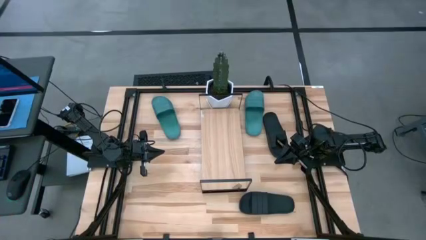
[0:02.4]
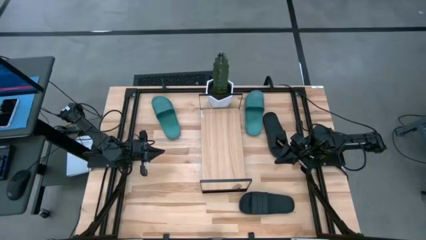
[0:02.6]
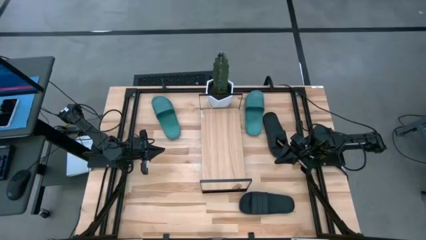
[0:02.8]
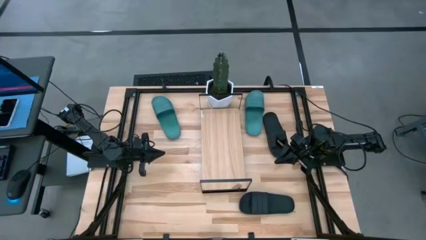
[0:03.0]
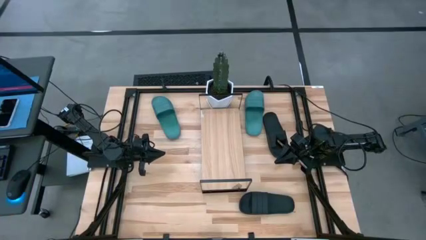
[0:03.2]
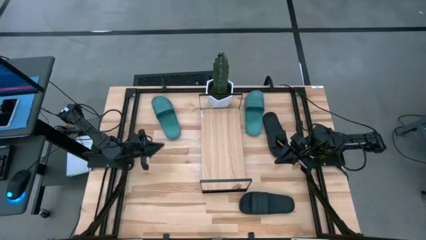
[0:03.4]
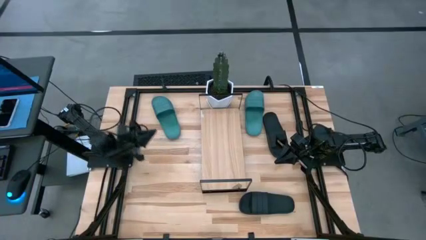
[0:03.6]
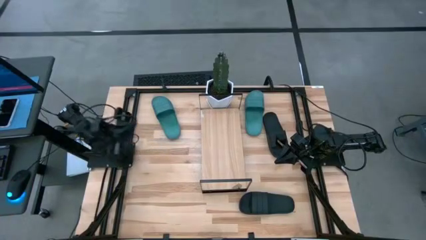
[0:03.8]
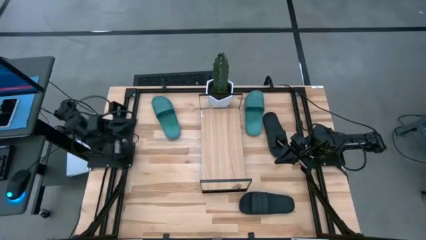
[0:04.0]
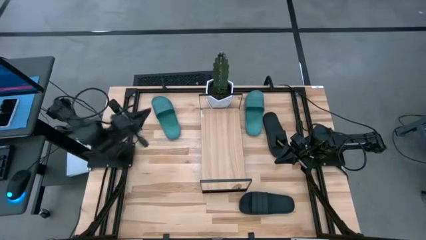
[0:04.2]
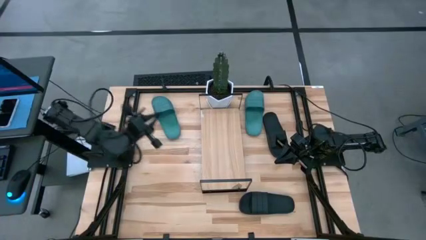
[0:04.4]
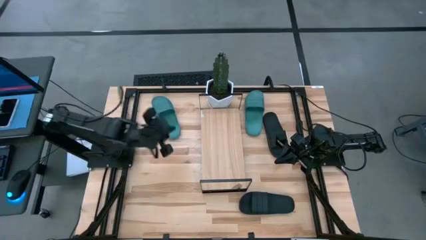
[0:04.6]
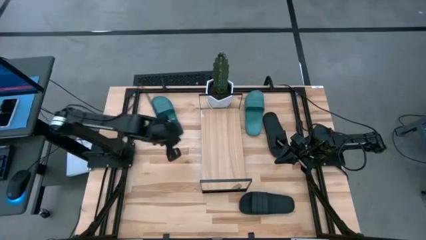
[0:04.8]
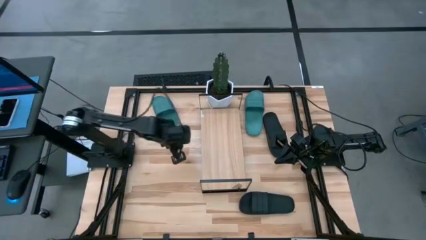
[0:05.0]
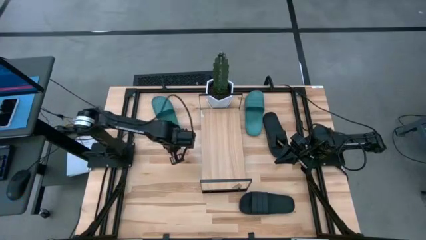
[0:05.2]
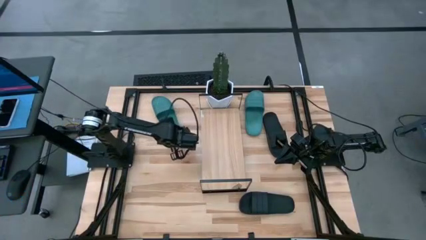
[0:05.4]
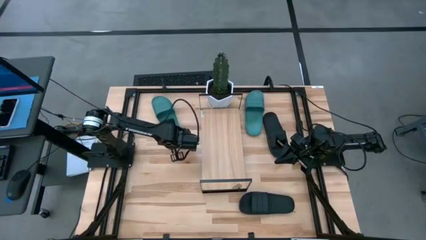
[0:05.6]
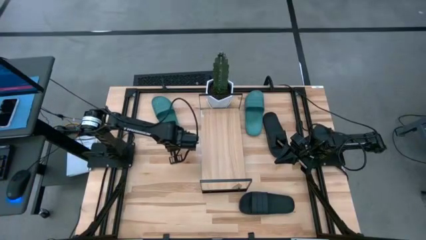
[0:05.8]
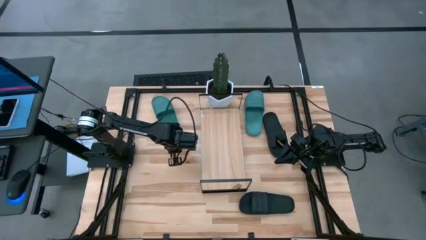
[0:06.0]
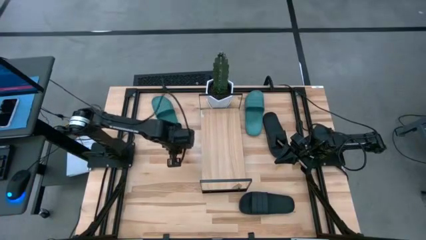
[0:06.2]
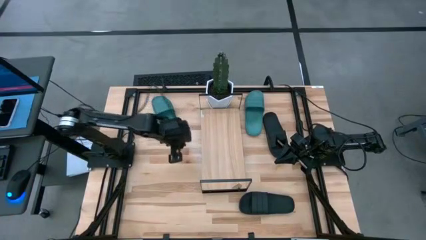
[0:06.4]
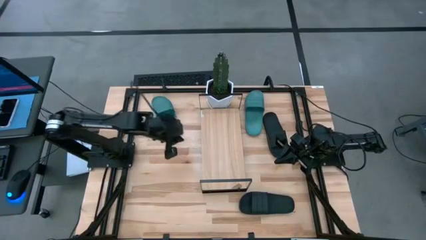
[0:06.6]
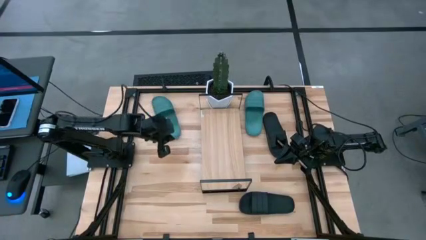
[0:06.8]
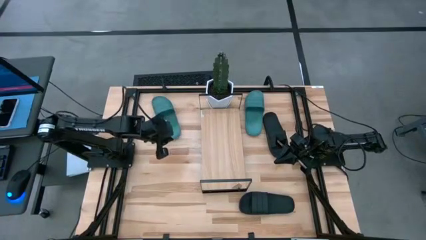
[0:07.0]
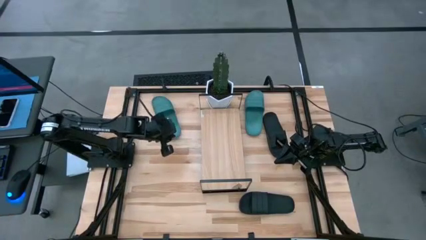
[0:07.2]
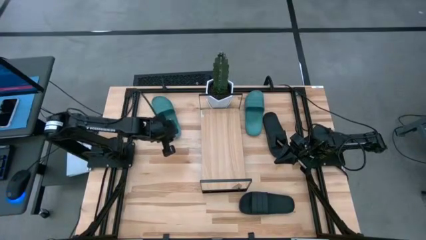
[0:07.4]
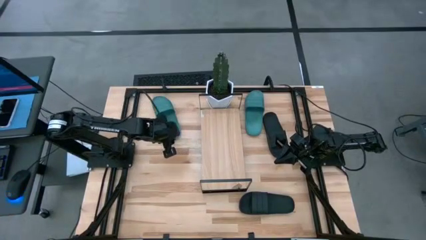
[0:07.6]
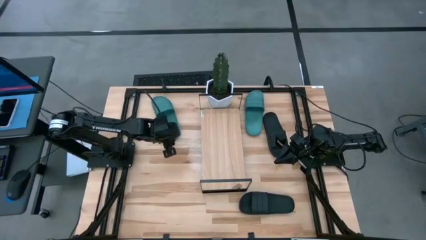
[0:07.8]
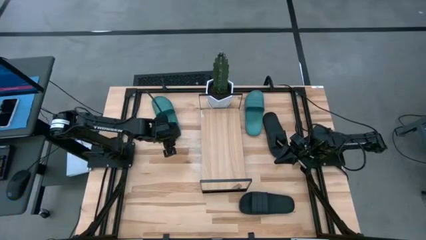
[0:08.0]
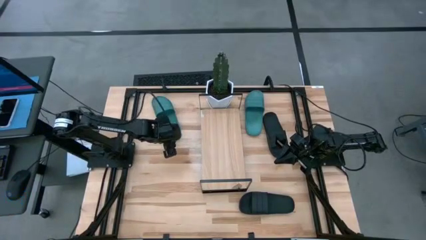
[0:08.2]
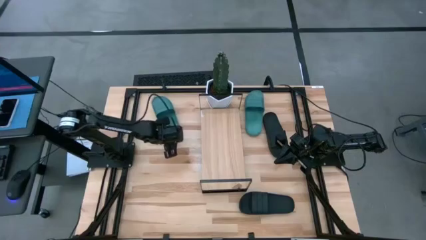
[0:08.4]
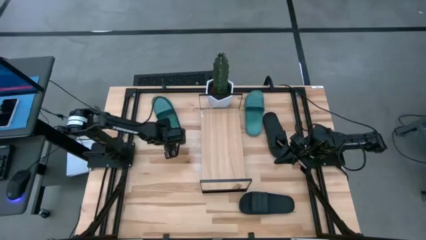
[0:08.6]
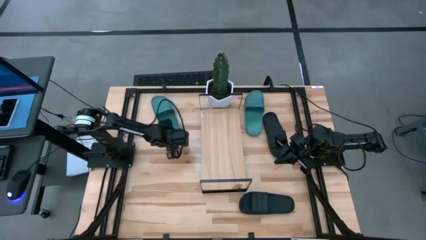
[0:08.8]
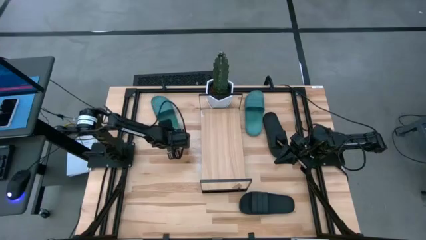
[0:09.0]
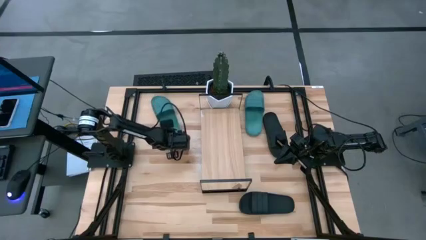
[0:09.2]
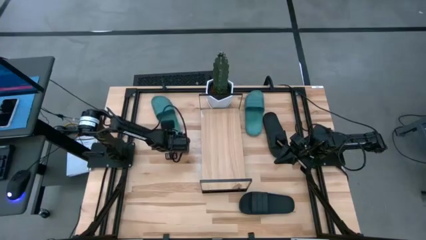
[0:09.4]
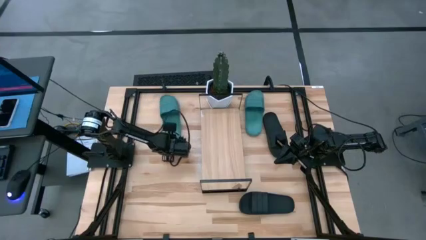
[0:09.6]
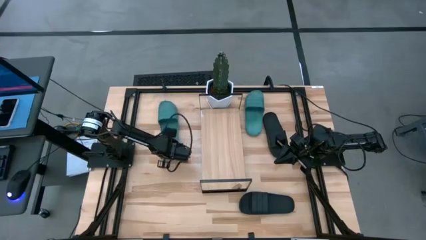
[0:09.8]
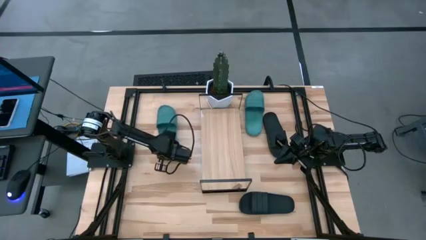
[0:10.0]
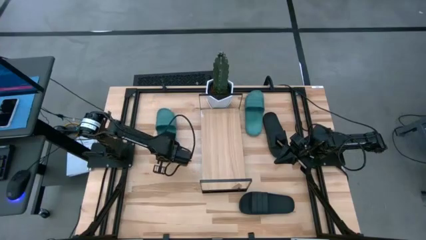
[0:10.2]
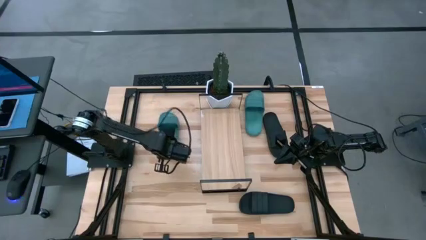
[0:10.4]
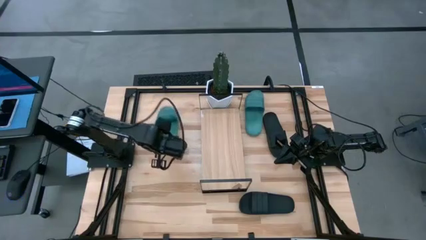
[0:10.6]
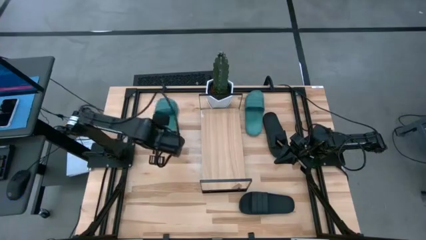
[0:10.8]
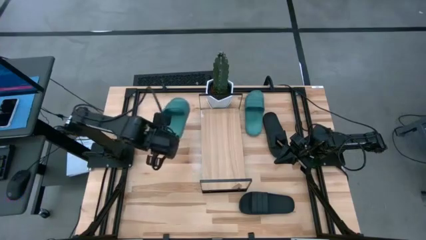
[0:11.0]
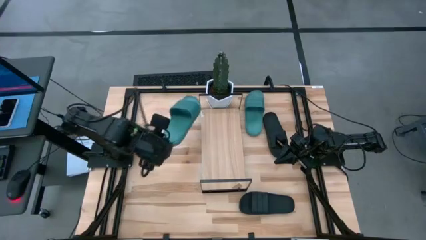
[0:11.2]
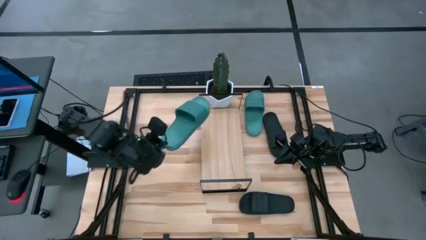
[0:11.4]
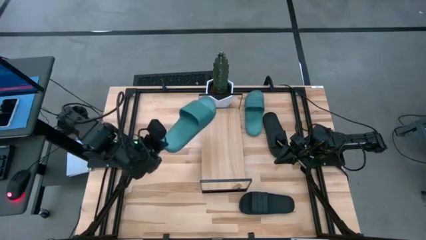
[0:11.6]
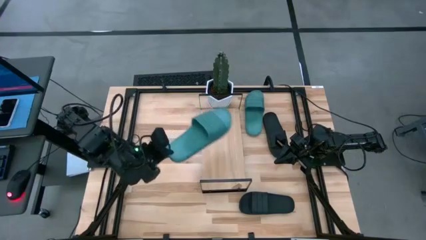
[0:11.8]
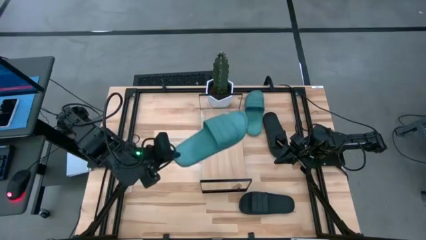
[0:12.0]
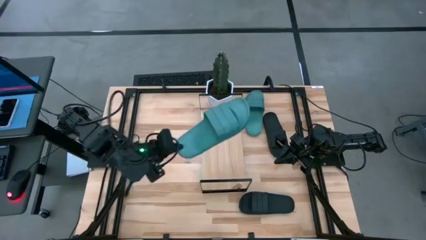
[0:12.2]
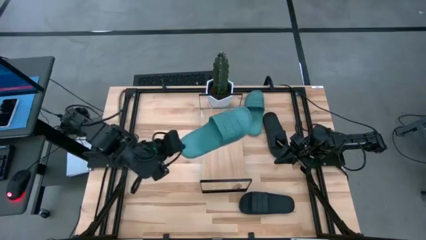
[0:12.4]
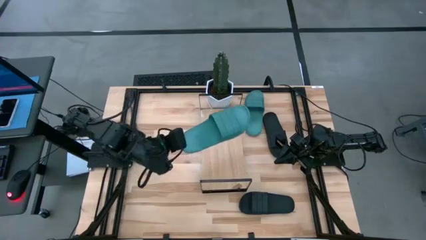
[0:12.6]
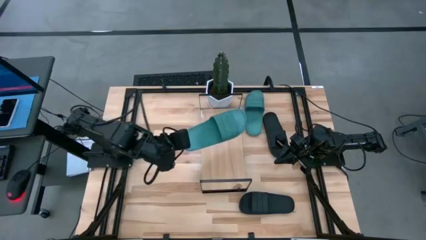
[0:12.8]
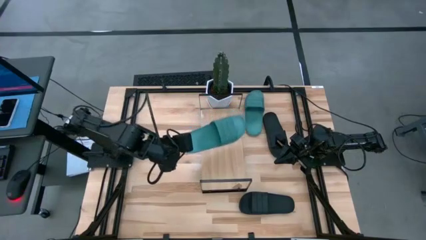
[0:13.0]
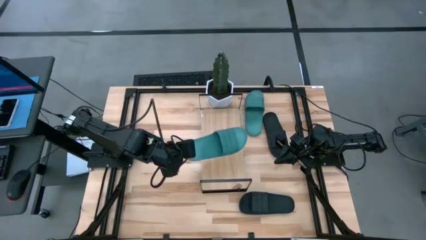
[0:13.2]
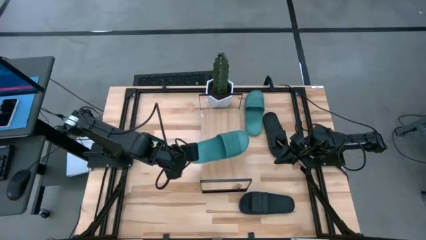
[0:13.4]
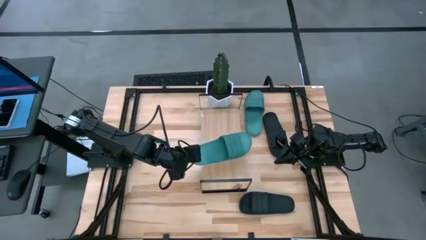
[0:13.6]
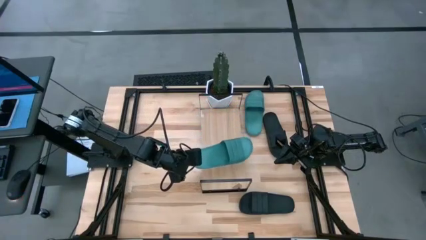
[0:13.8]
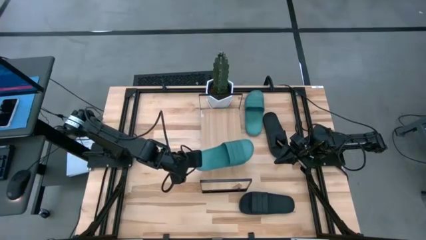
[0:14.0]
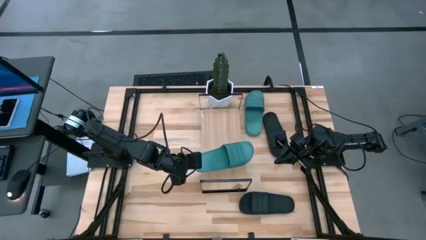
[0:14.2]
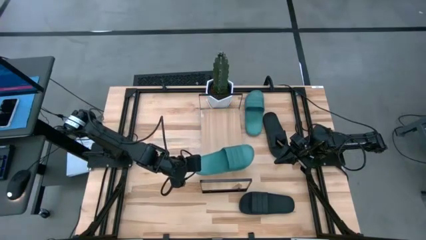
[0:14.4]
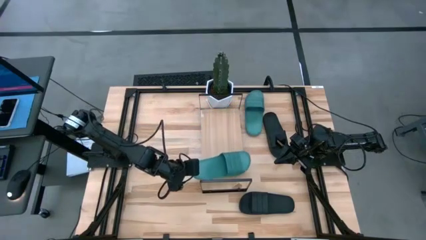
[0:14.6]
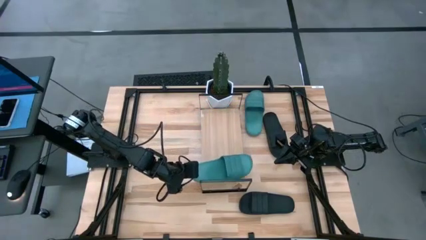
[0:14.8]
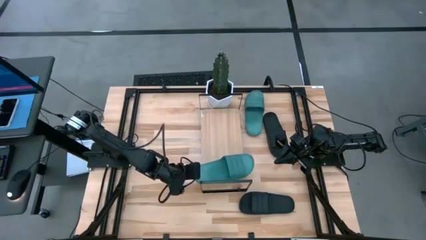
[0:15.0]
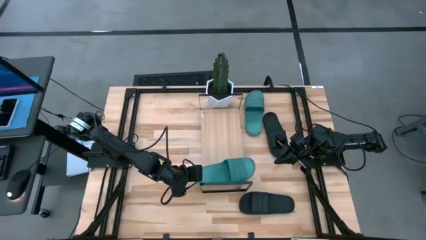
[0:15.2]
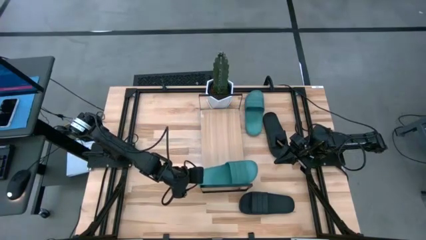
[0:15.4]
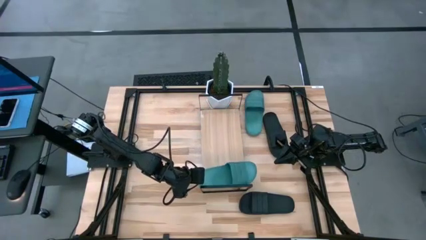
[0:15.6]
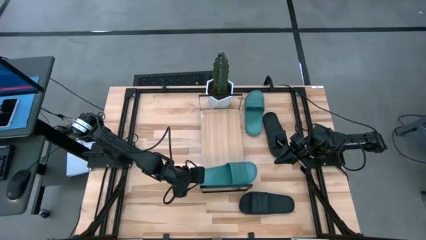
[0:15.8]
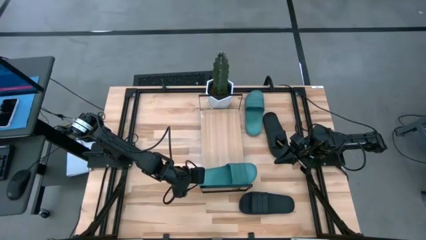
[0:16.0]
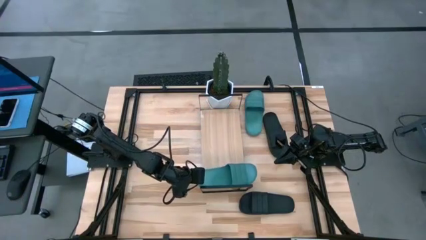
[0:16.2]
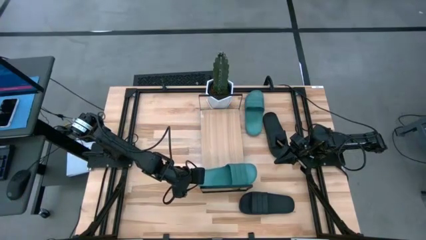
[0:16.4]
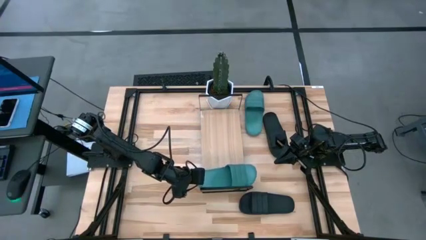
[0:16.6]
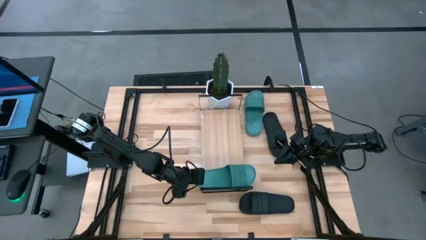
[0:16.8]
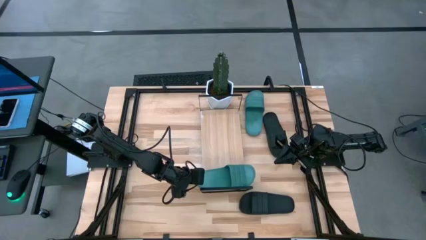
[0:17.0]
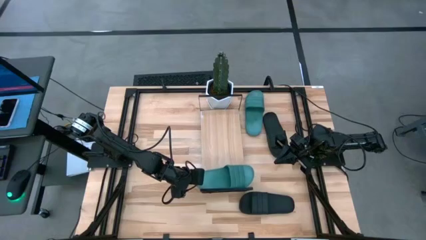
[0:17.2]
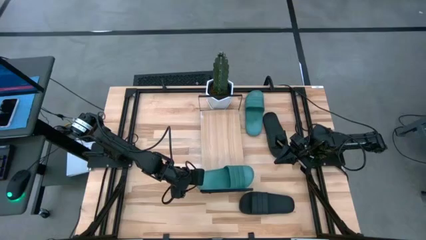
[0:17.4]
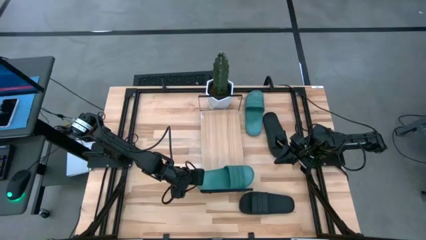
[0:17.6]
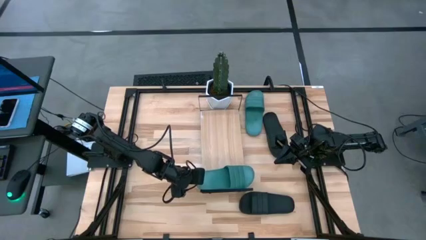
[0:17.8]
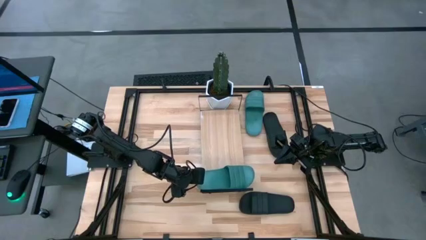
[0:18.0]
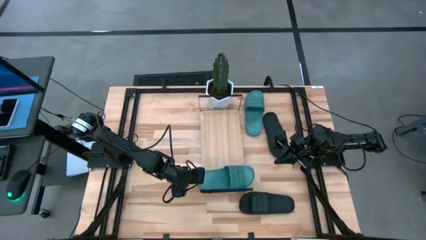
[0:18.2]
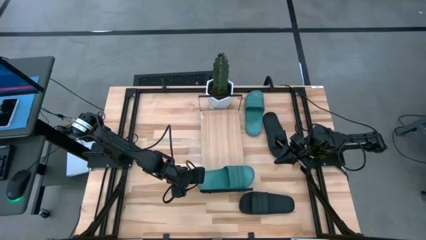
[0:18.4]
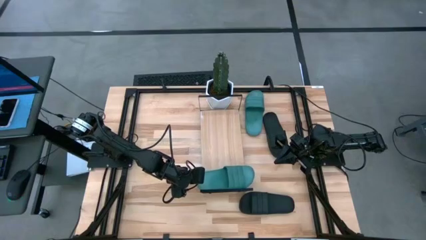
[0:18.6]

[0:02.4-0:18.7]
Task: Pick and place slides into the shelf
Put the left green slipper on the shelf
